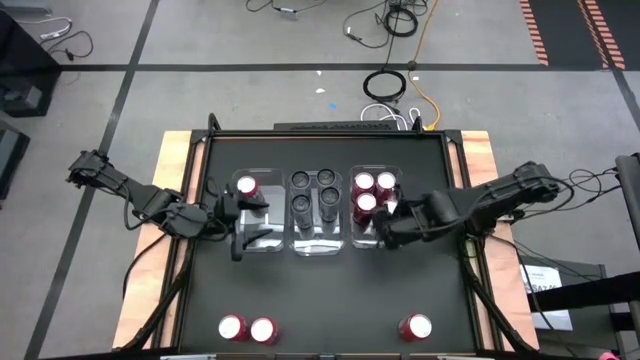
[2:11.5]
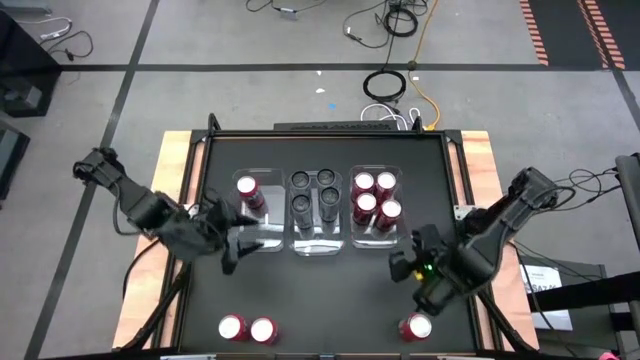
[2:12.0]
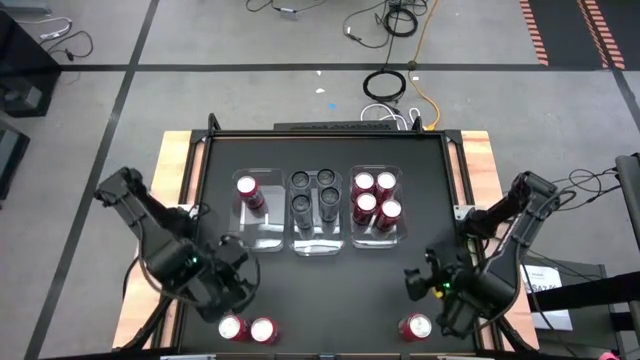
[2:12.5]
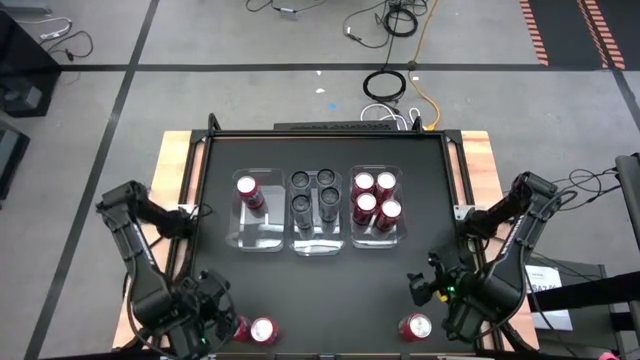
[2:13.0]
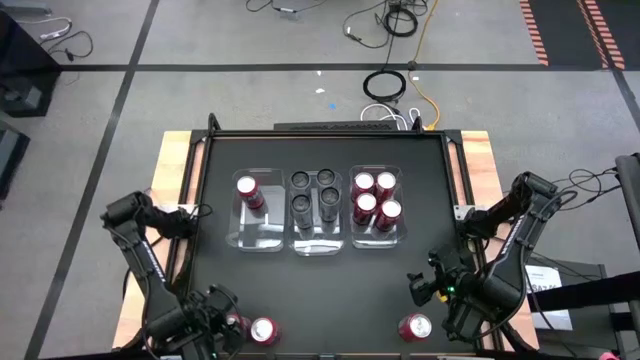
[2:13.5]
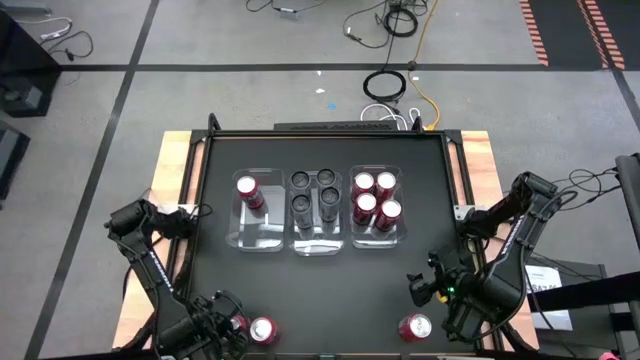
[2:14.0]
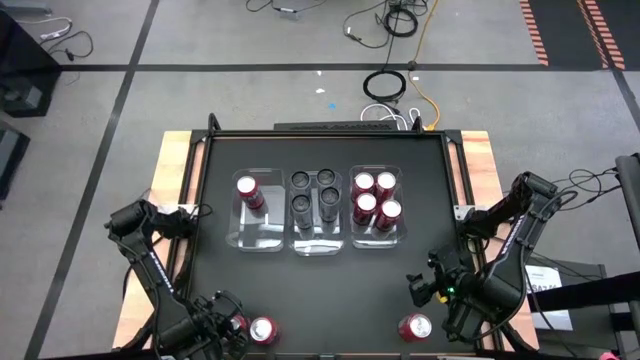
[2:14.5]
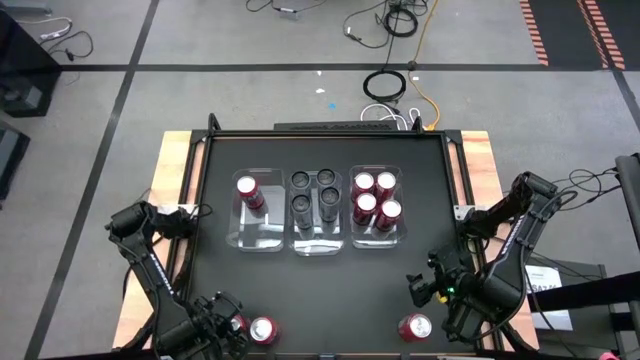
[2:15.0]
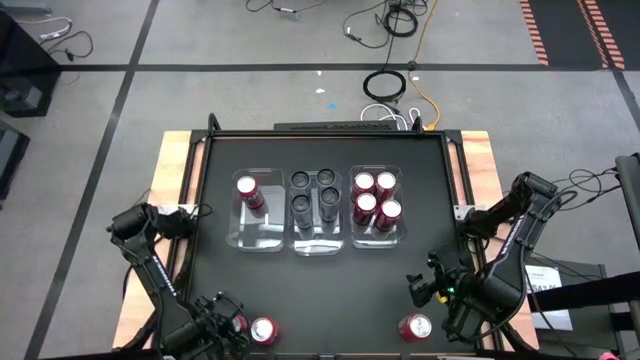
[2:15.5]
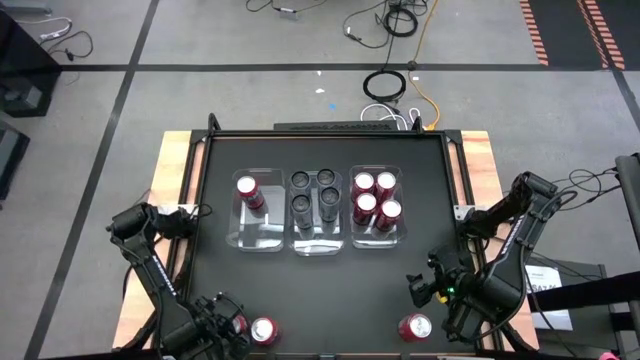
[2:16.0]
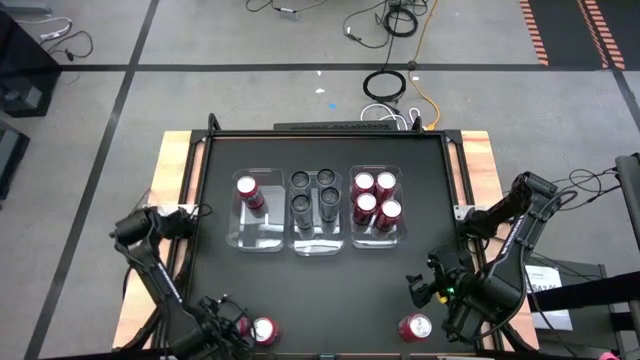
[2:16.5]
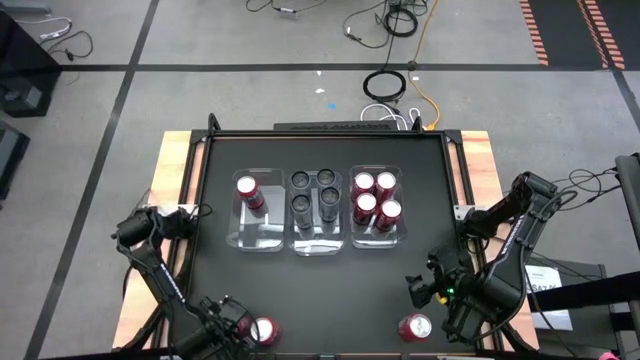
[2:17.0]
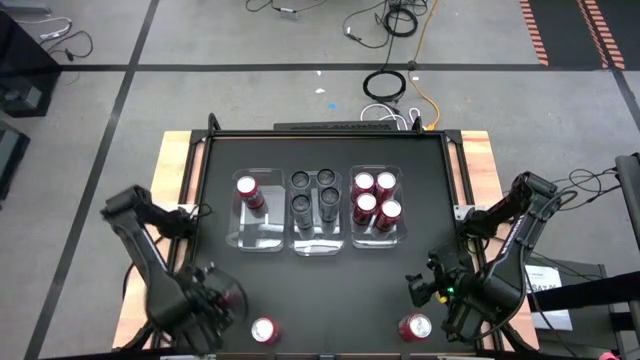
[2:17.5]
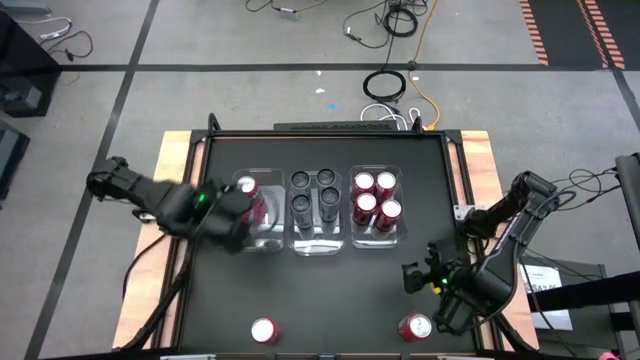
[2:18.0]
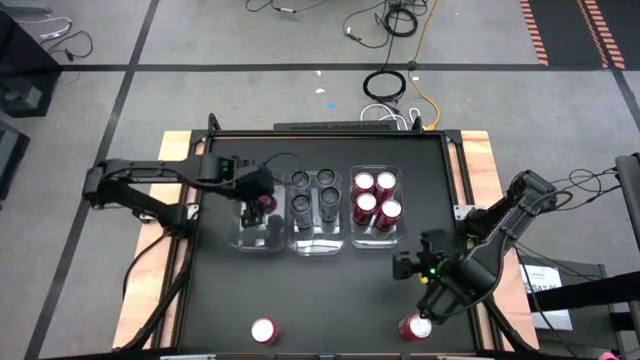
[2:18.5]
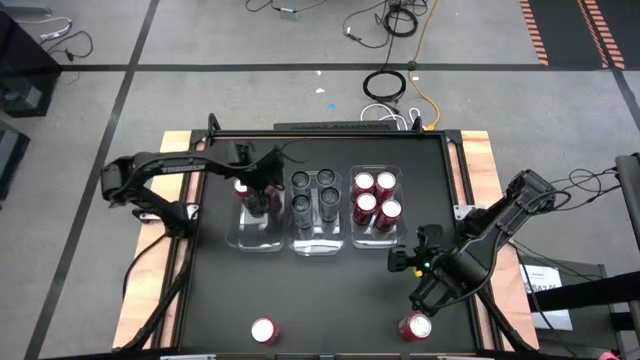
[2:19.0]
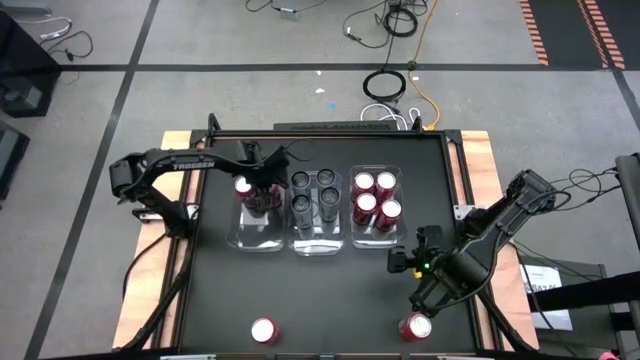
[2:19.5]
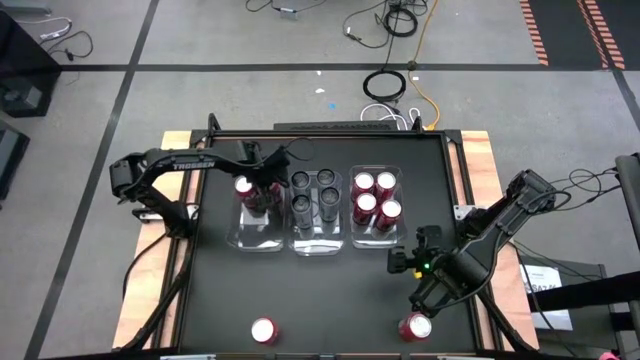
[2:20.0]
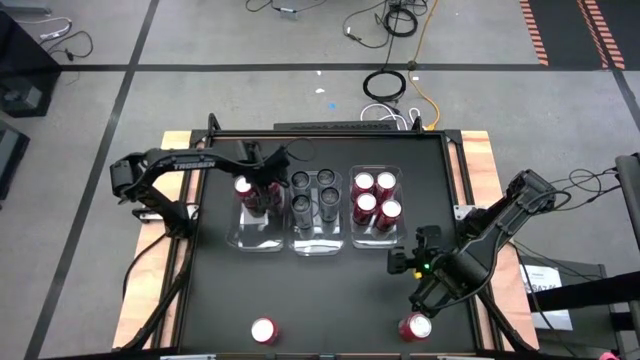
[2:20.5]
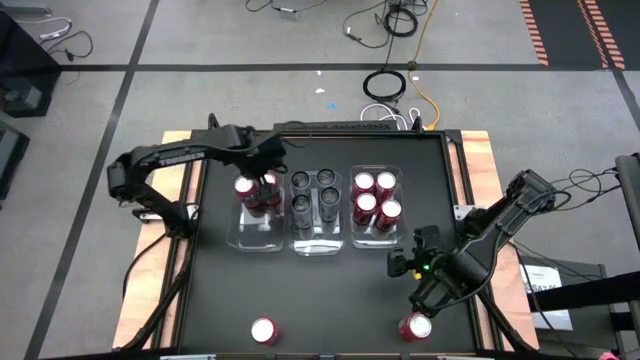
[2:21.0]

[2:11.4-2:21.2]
Task: Sort soda cans
Put the left orange soda can into the left transparent bin

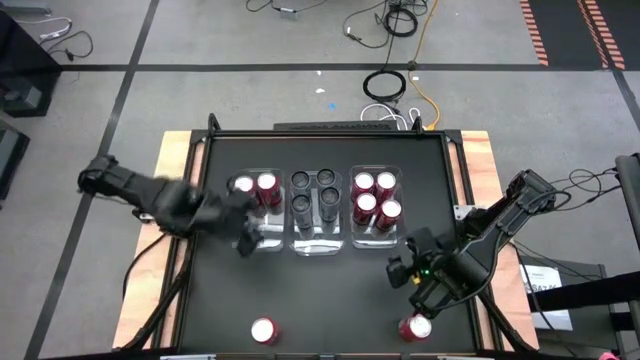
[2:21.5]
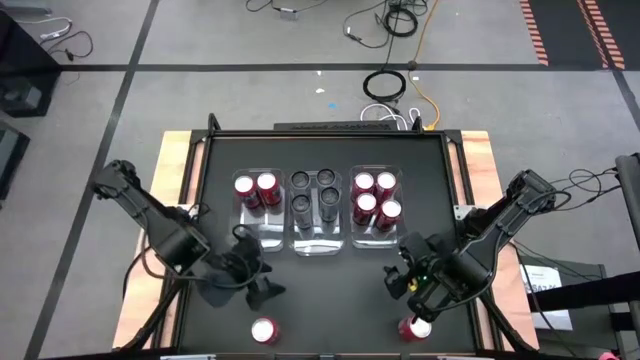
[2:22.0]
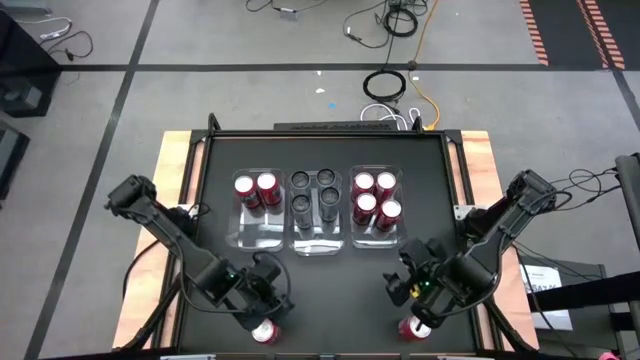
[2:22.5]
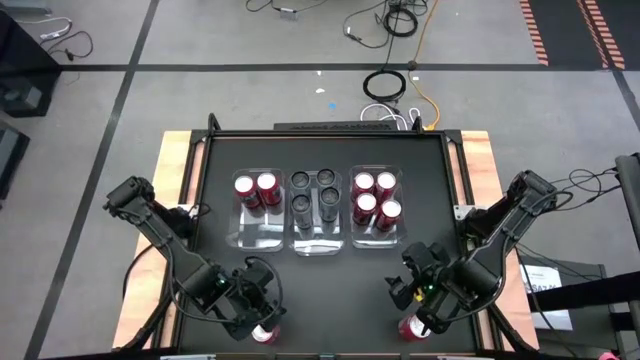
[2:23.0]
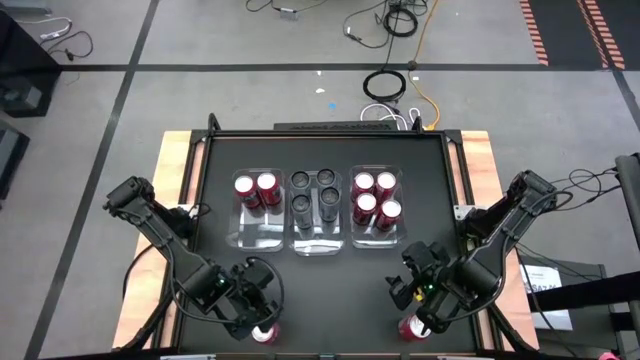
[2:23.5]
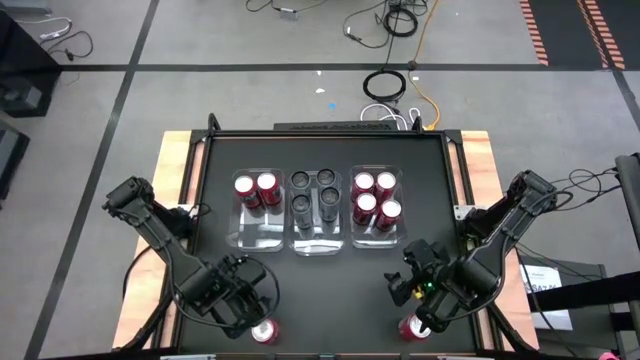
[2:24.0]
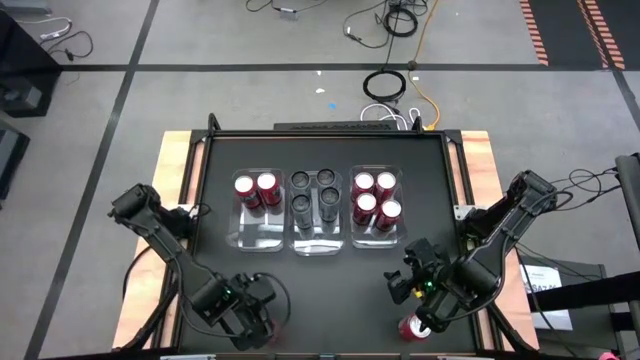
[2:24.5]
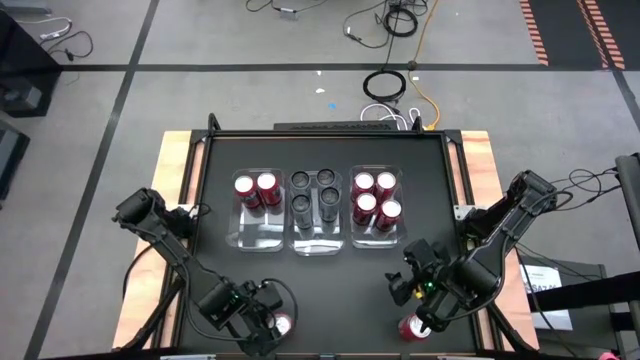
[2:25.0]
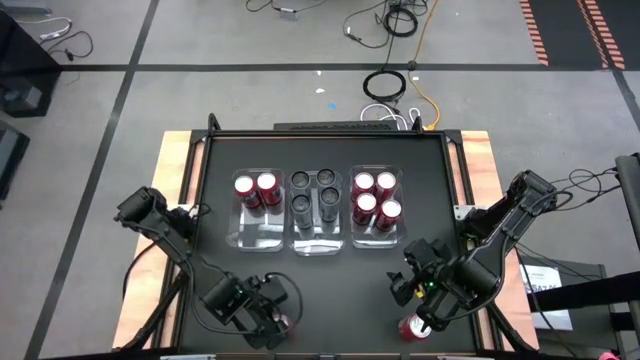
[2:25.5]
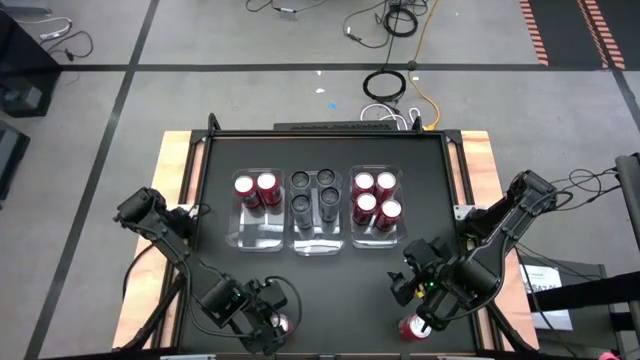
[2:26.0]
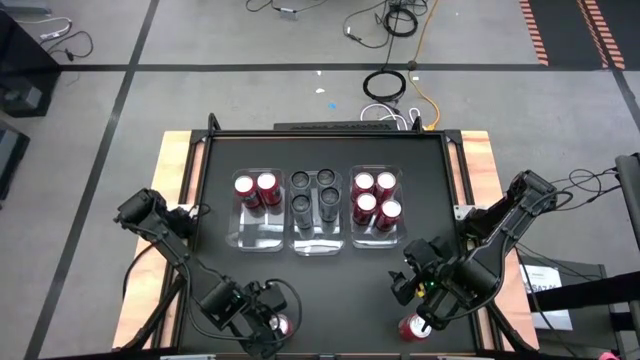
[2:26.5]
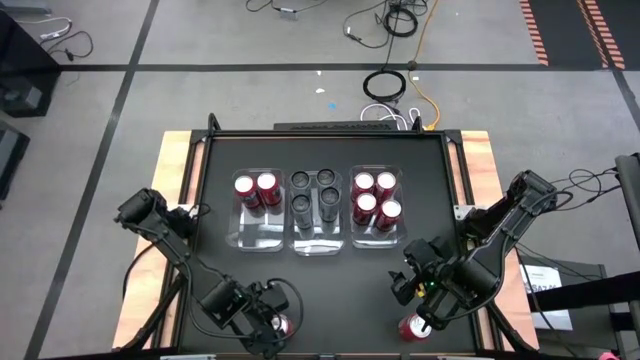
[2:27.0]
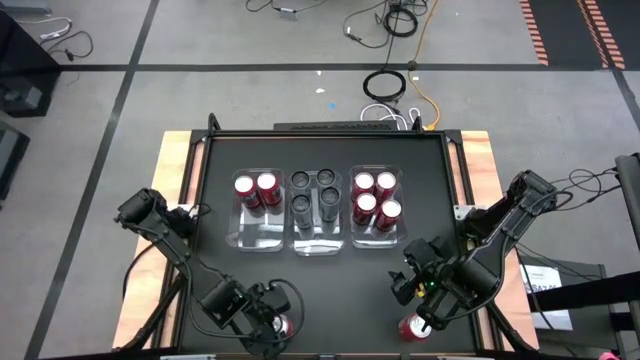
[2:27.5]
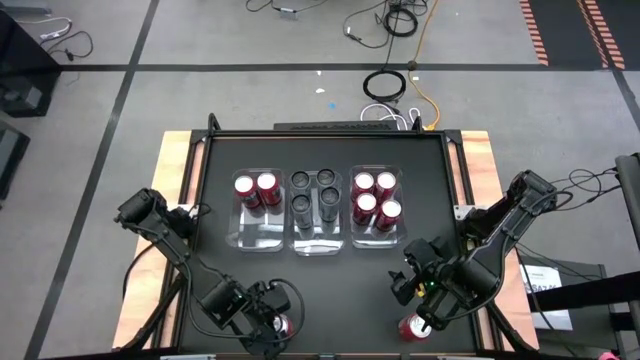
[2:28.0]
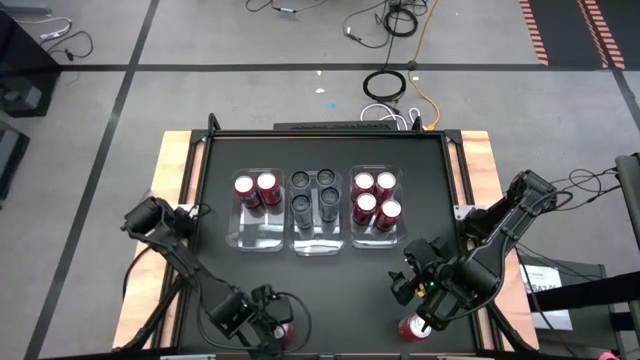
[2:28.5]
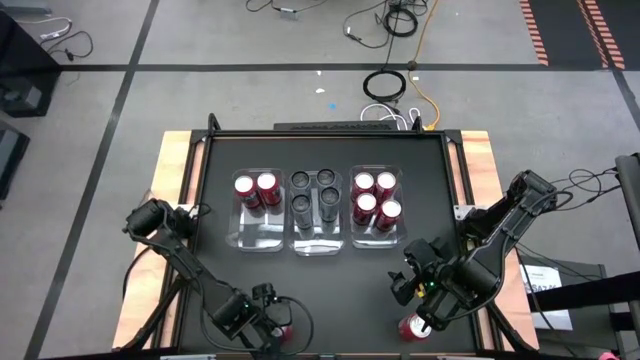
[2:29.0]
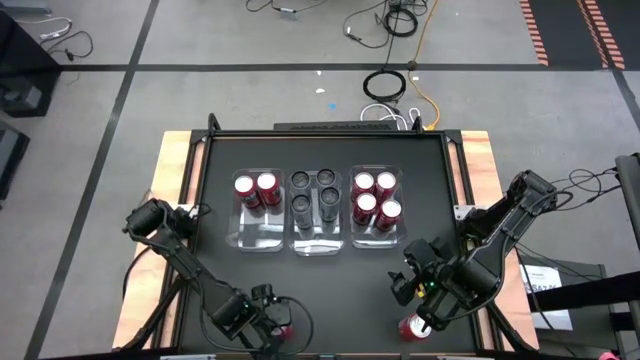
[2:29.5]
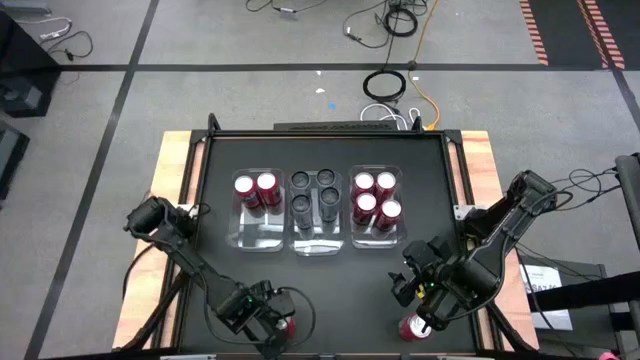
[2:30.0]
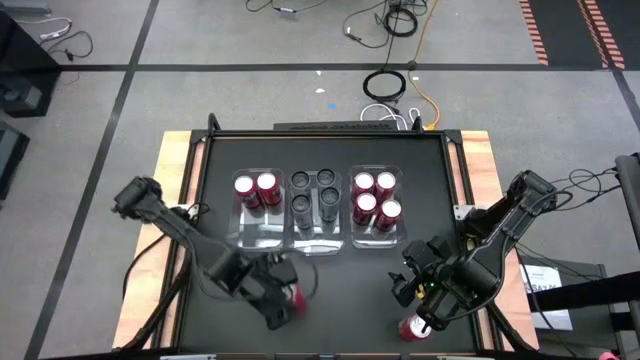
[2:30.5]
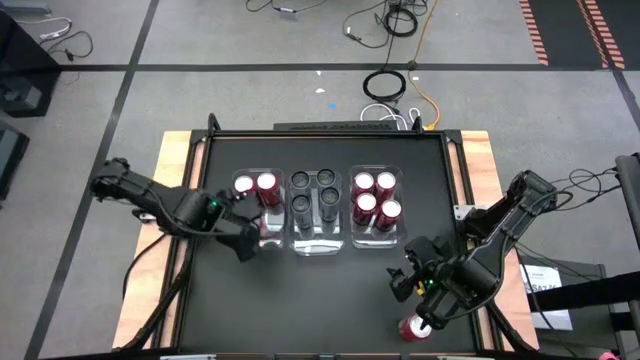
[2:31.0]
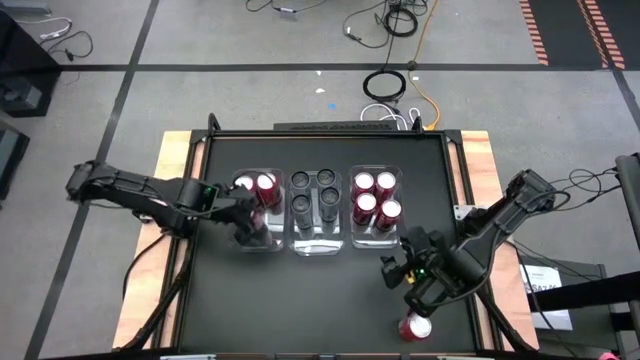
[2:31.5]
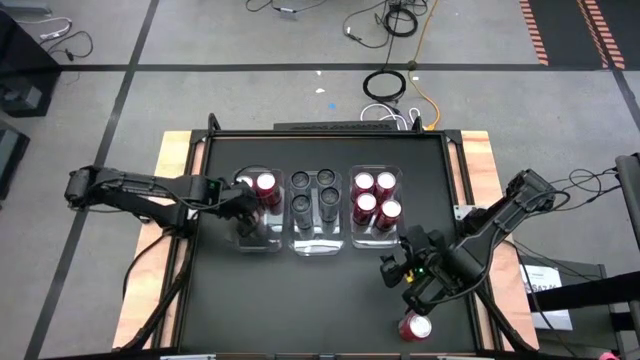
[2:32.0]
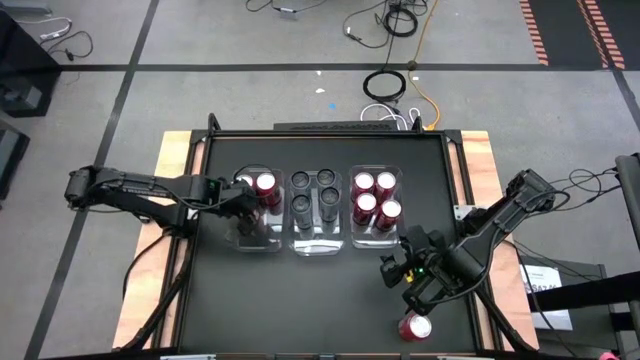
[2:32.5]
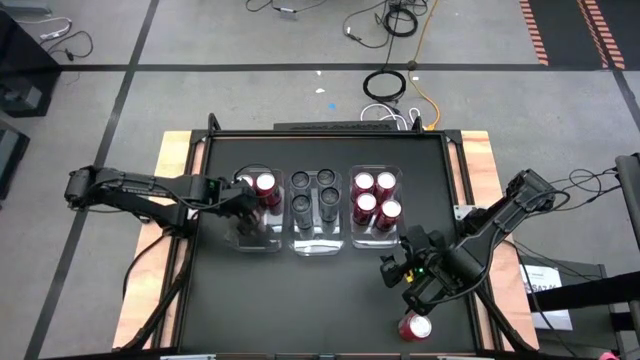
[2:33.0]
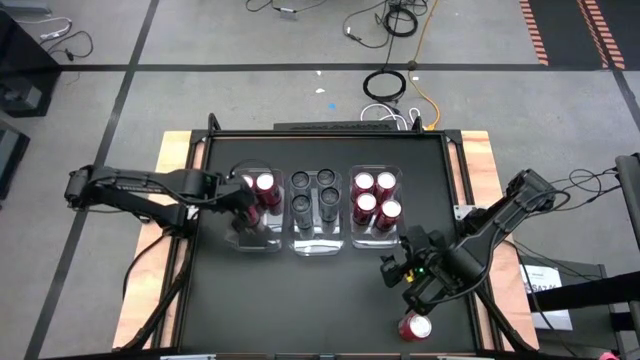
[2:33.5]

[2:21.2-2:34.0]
Put the left orange soda can into the left transparent bin
